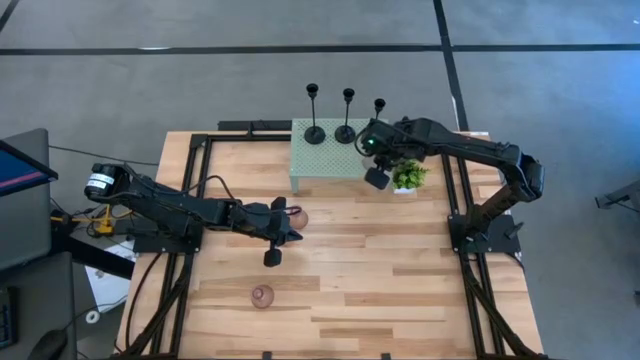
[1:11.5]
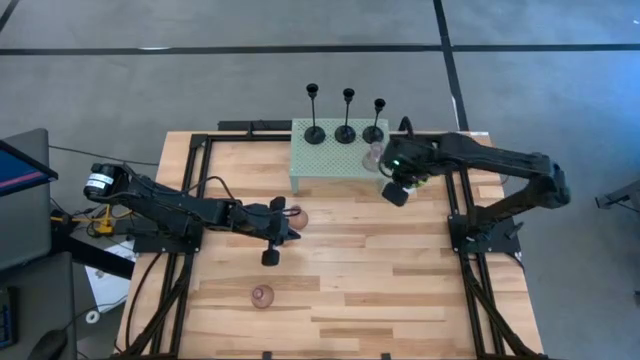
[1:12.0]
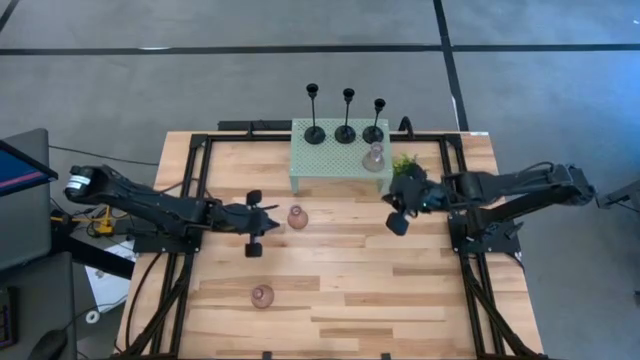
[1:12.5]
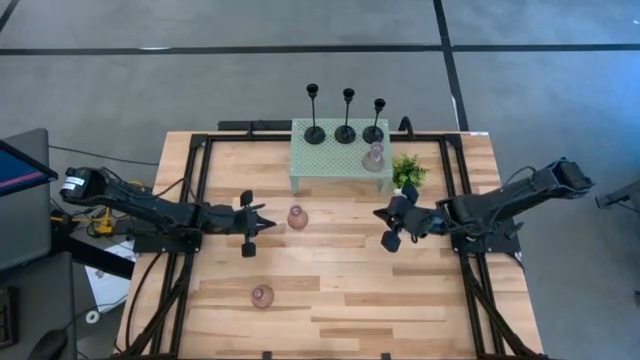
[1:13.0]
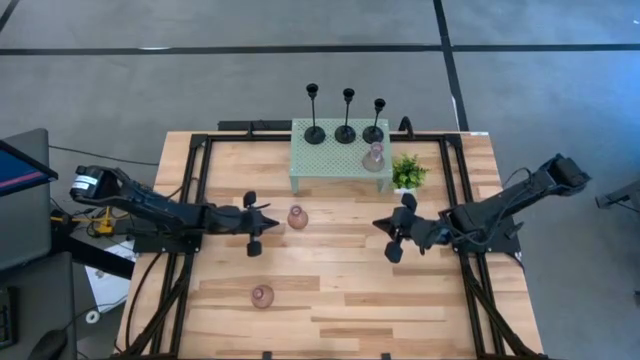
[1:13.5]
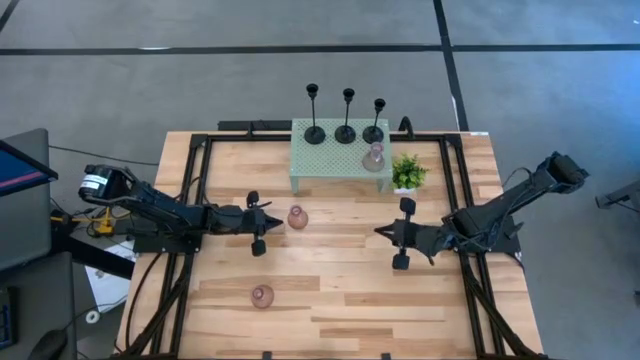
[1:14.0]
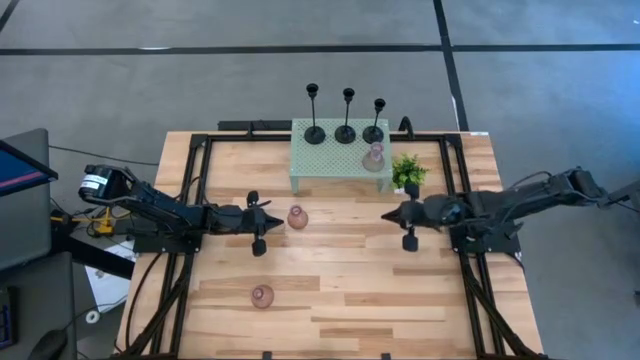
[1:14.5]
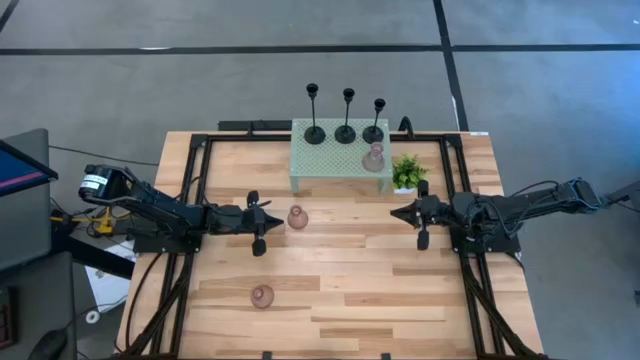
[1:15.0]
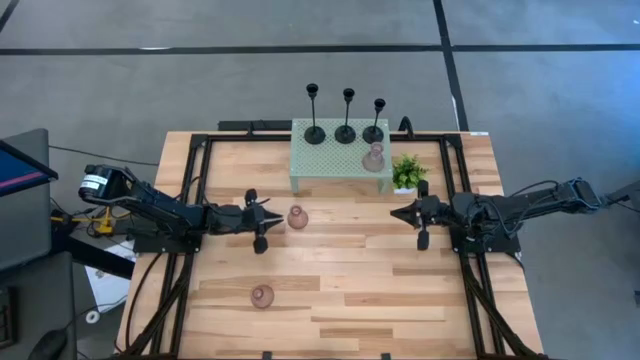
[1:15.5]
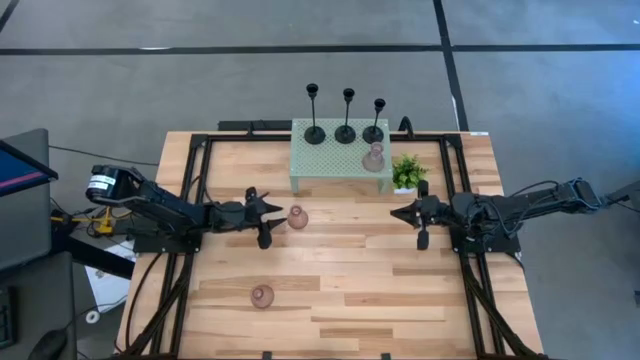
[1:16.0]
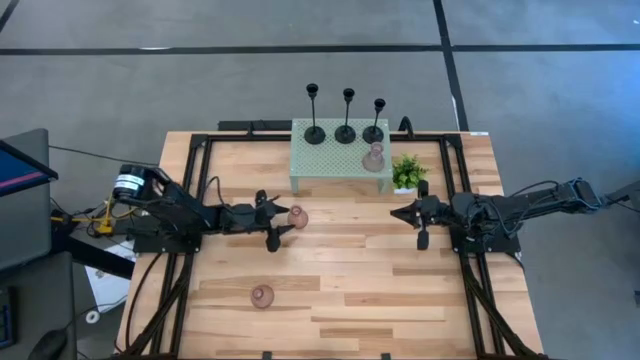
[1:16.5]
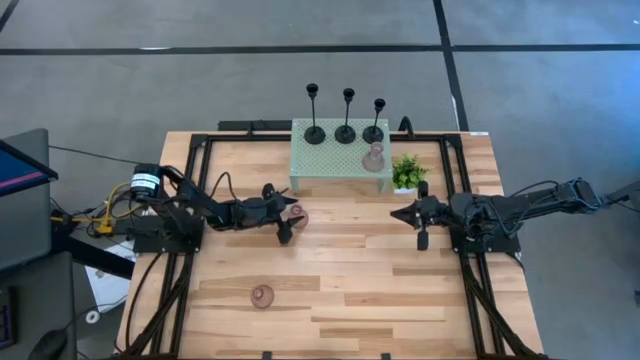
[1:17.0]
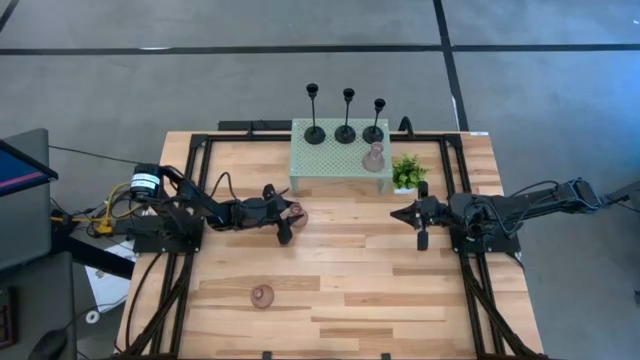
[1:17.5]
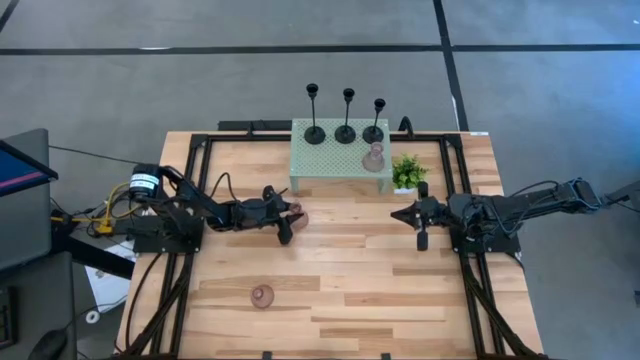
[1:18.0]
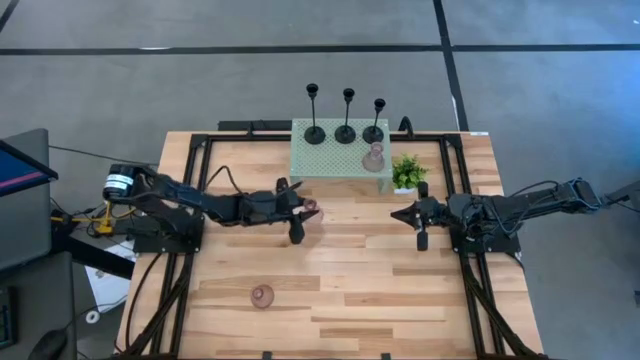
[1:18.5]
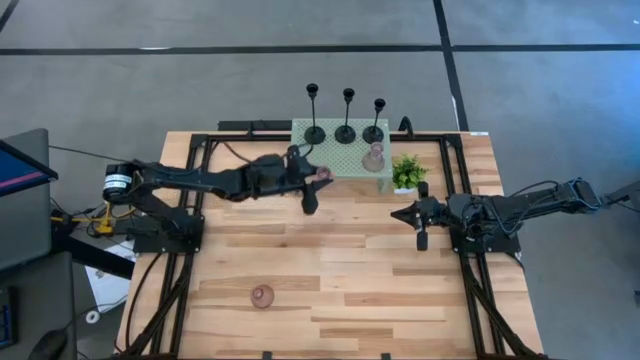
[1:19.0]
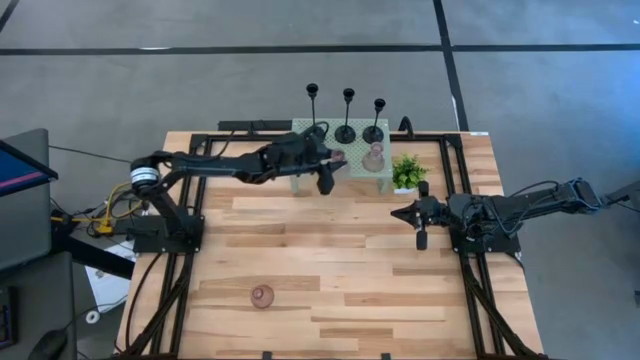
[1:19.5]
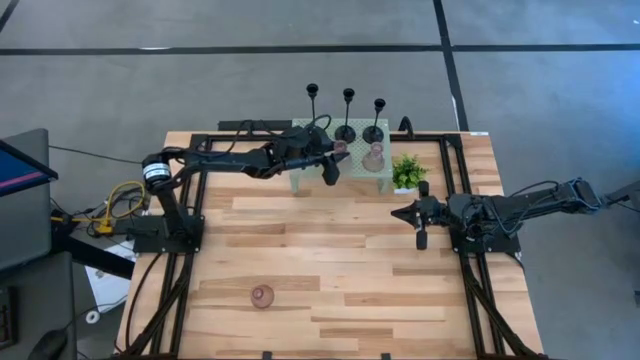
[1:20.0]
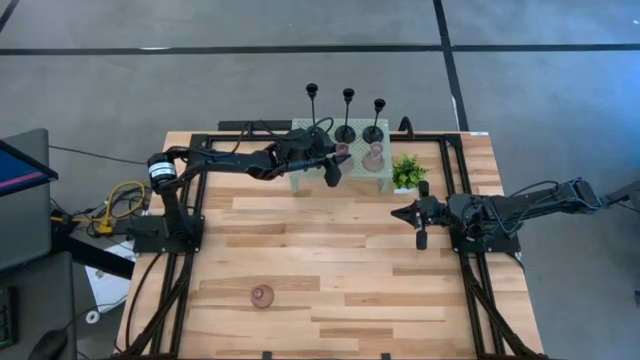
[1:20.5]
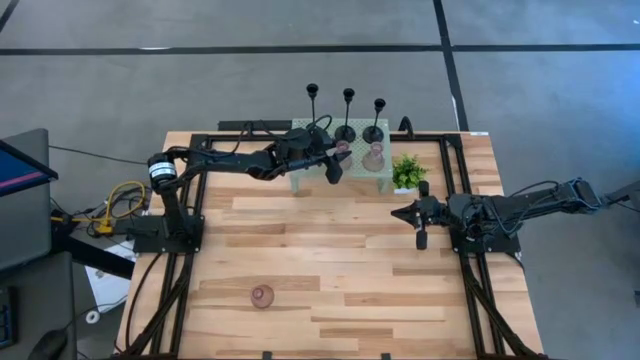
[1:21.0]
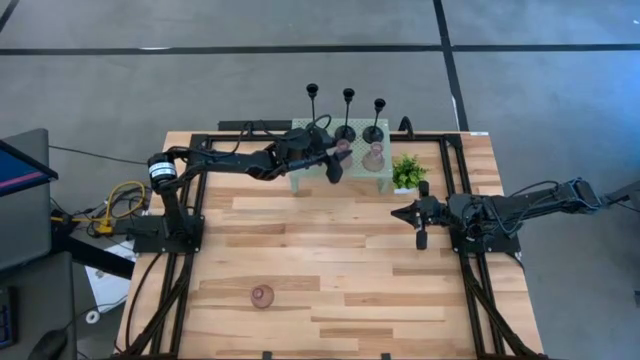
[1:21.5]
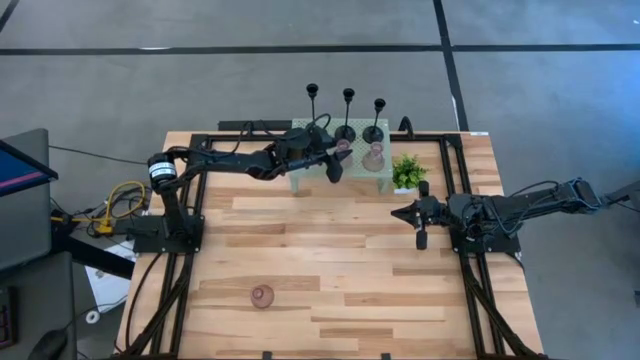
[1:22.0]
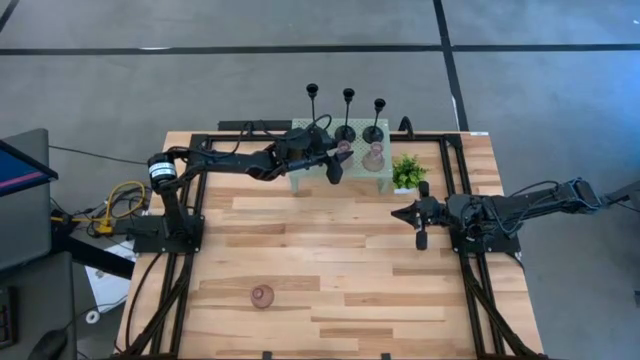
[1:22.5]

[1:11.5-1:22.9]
Task: Pick & Place candle stick holders
Put the top pink candle holder on the shelf aligned with the pink candle holder

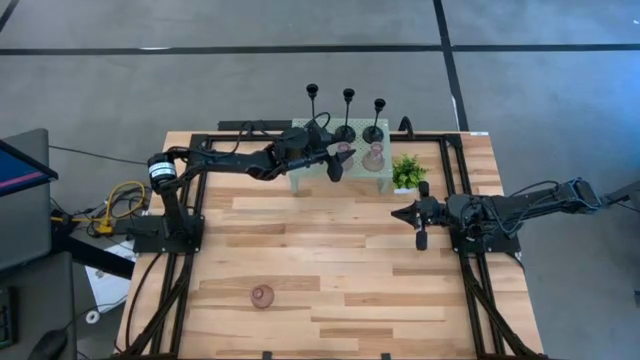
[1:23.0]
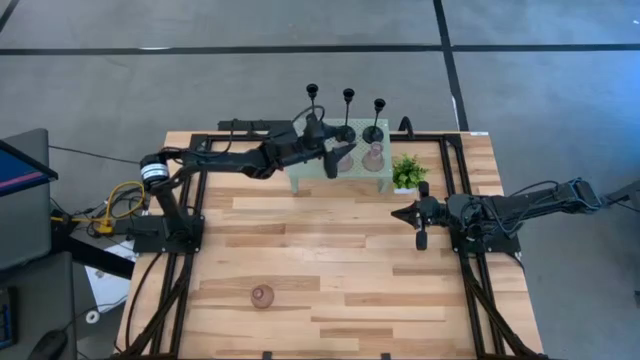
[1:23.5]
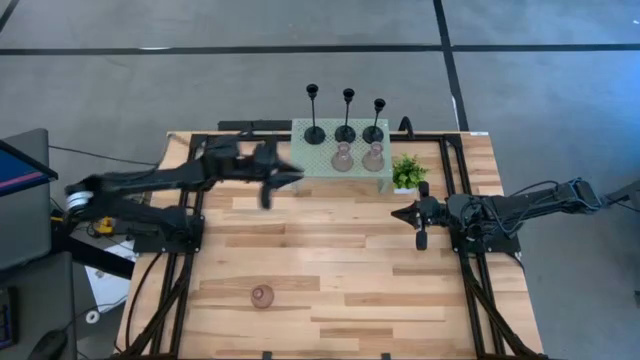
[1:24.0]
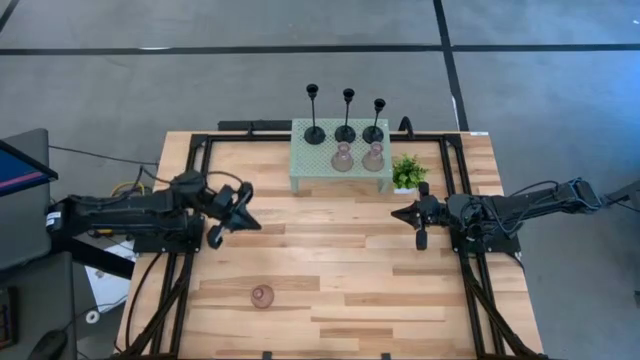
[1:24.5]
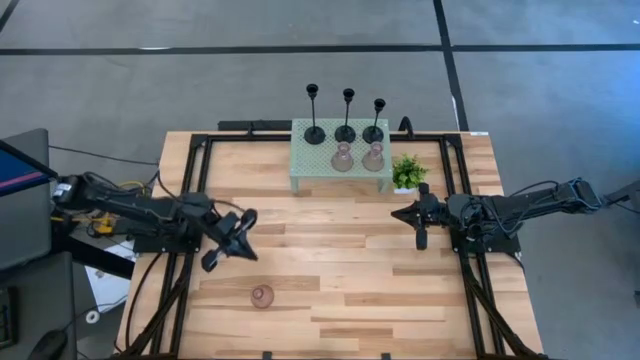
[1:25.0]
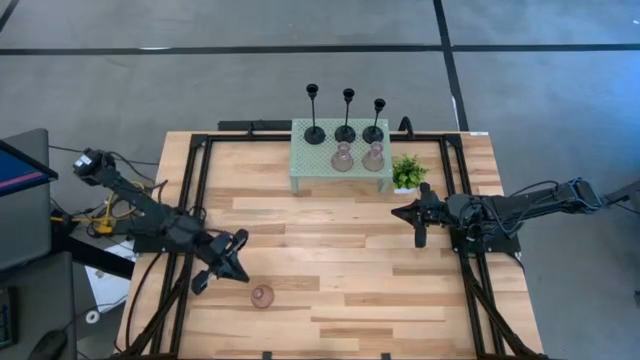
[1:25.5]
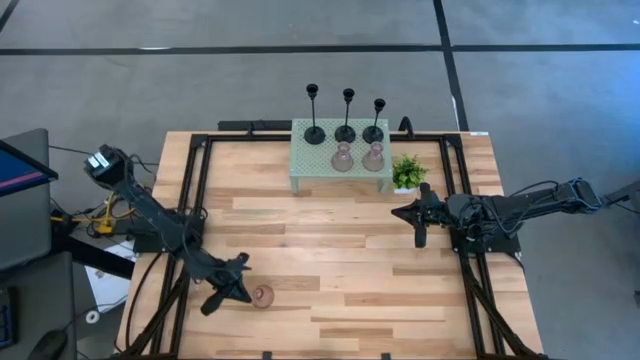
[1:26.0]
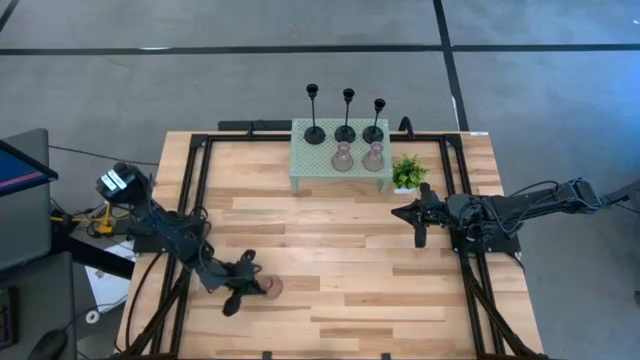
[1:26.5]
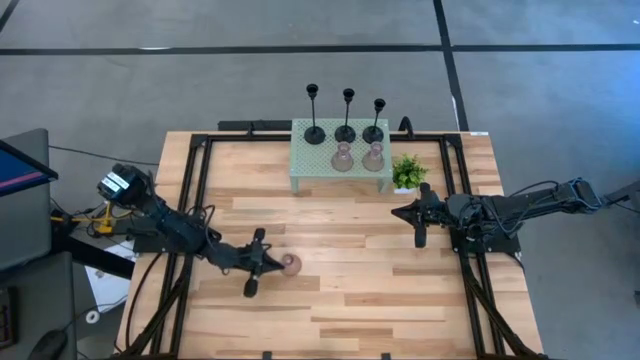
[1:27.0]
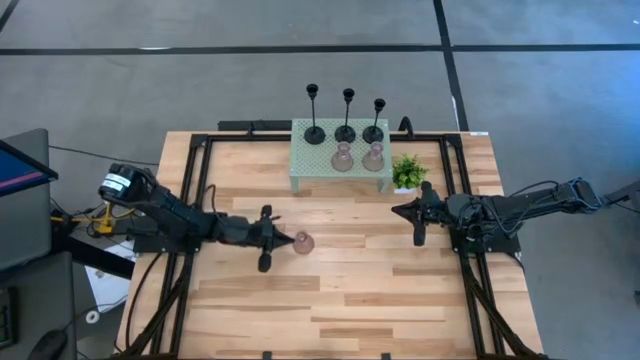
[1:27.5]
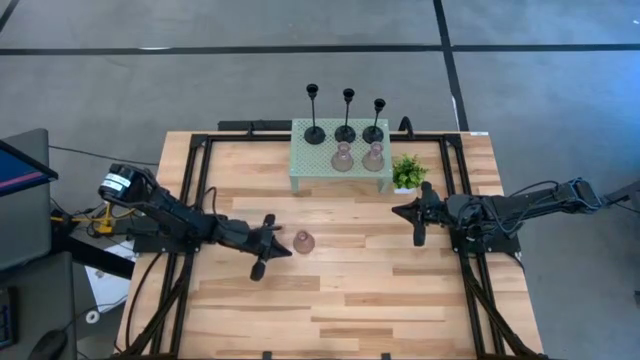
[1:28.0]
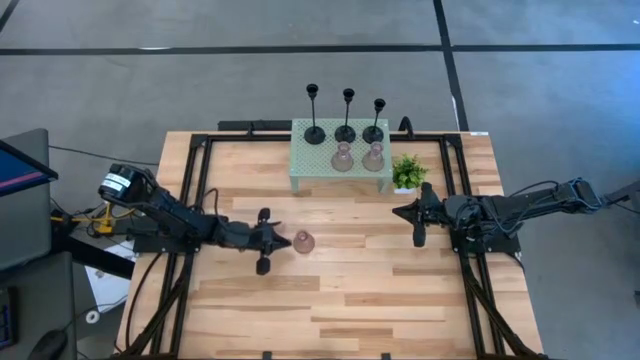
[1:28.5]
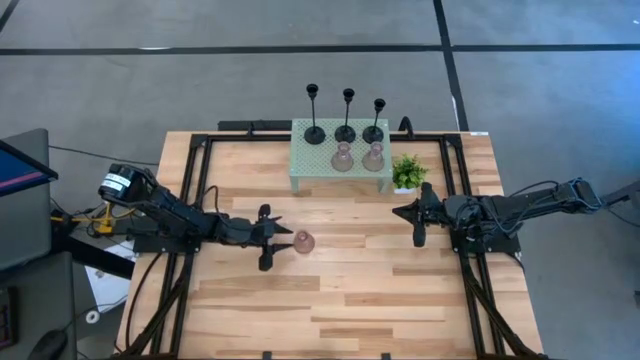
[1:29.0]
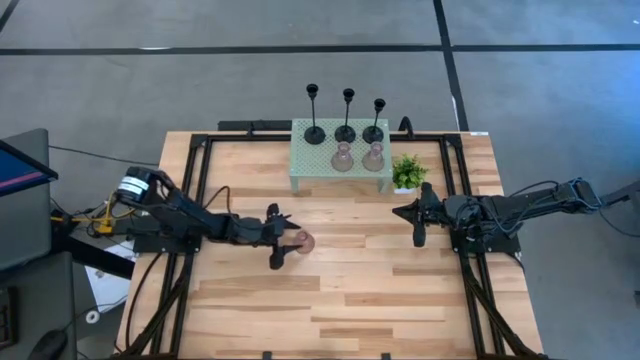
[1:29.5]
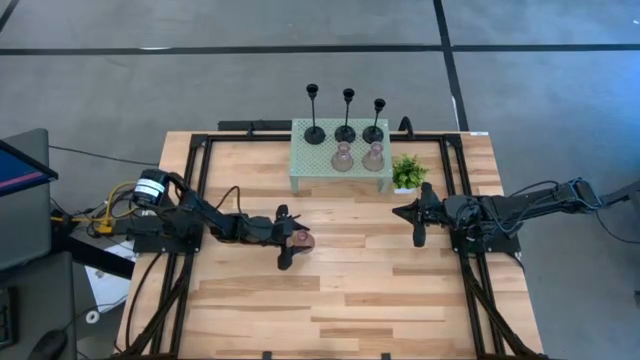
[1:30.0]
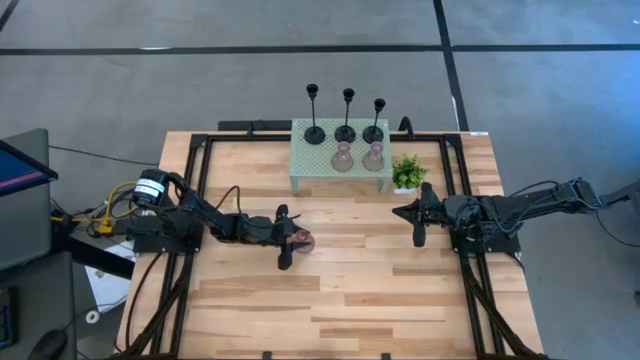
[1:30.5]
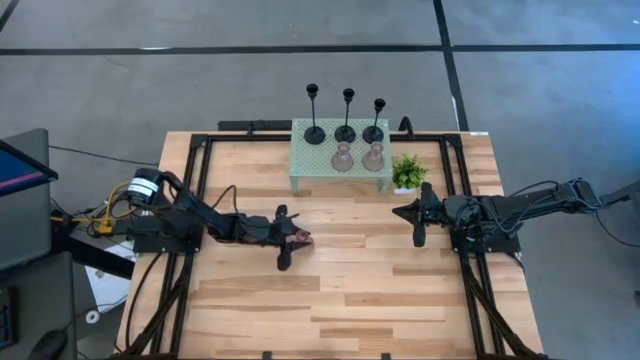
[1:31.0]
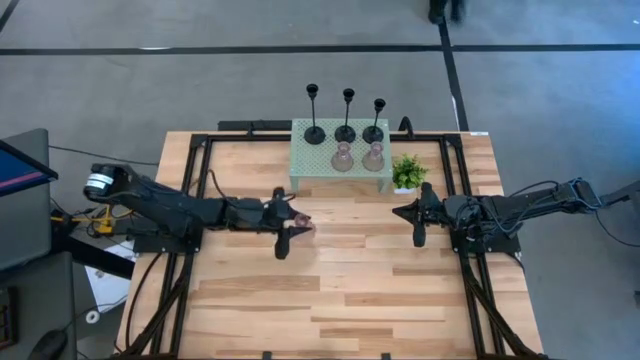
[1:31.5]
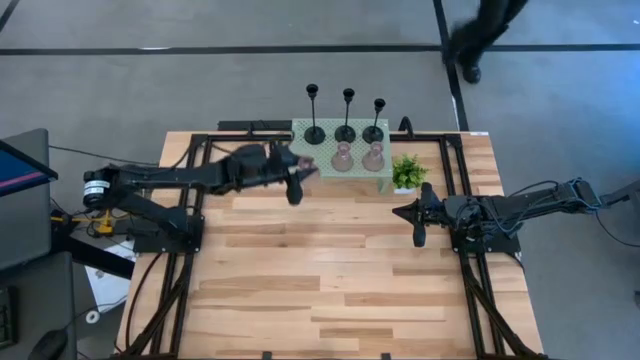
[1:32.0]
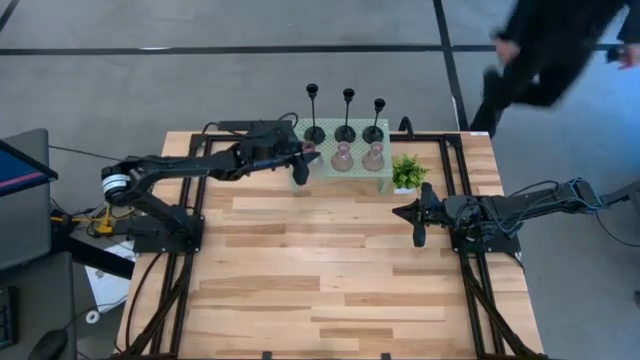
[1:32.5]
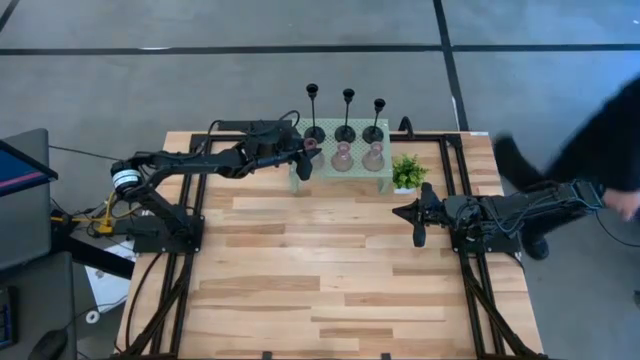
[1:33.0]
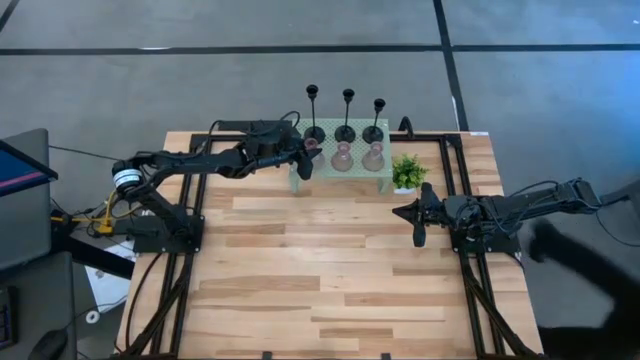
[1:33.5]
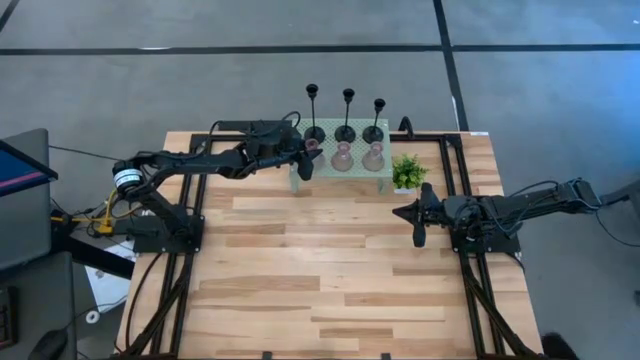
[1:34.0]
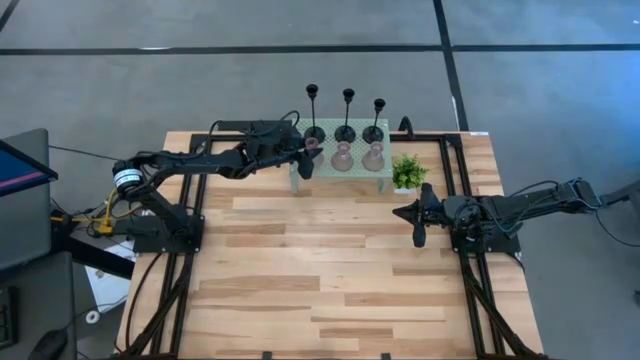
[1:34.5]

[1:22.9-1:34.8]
Put the pink candle holder on the shelf aligned with the pink candle holders
